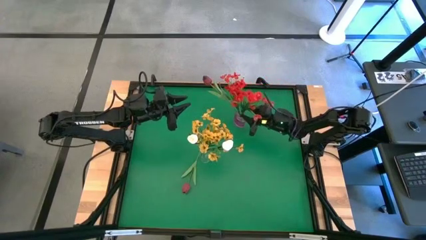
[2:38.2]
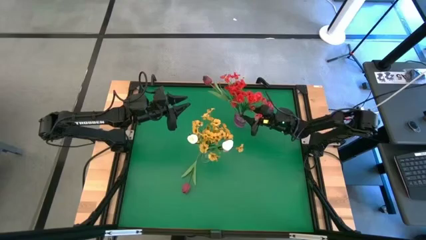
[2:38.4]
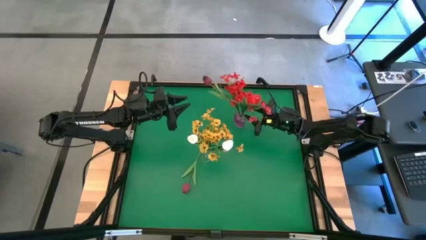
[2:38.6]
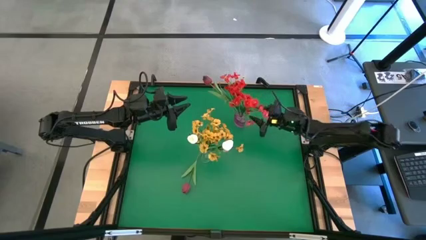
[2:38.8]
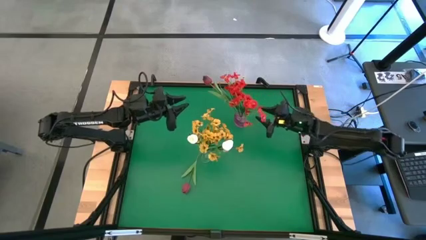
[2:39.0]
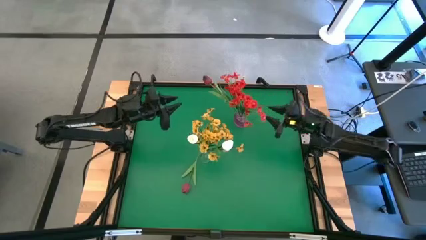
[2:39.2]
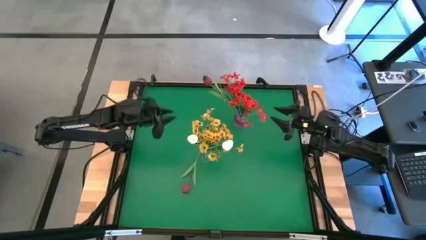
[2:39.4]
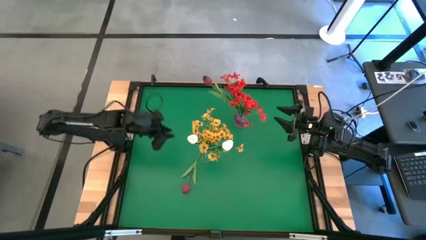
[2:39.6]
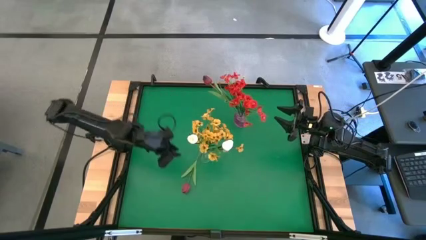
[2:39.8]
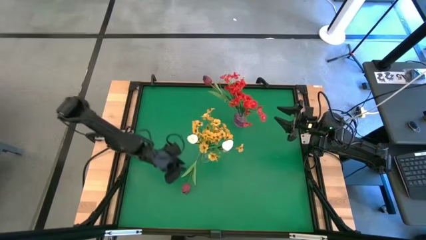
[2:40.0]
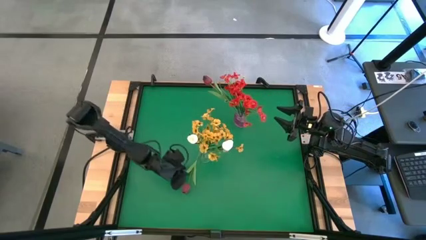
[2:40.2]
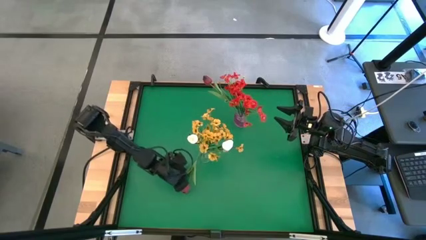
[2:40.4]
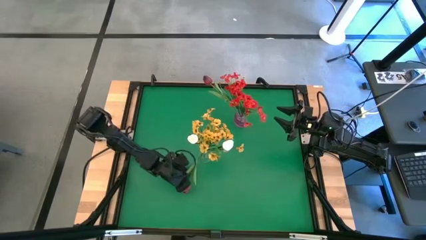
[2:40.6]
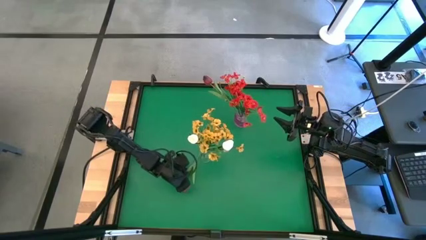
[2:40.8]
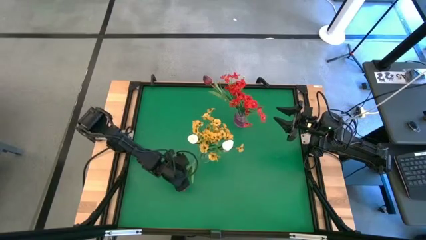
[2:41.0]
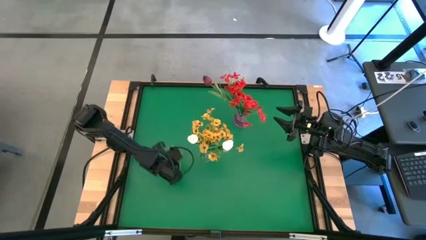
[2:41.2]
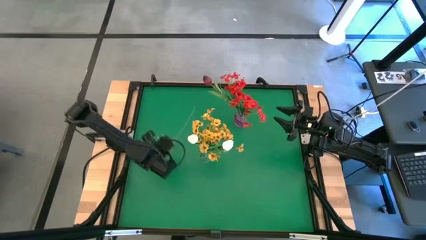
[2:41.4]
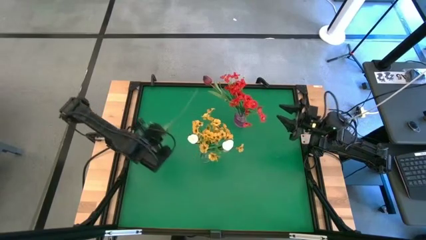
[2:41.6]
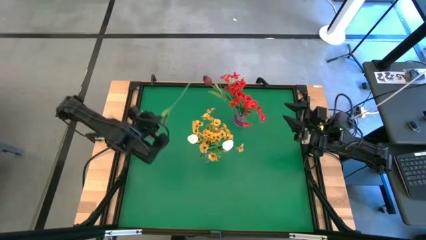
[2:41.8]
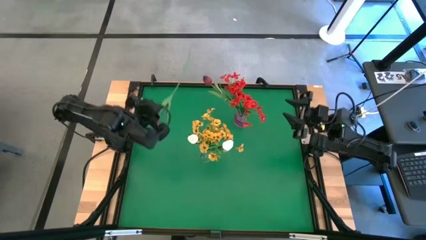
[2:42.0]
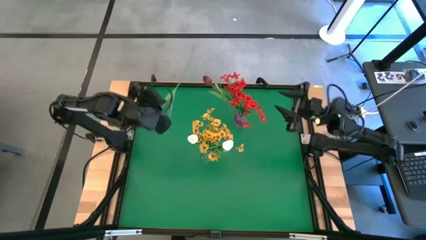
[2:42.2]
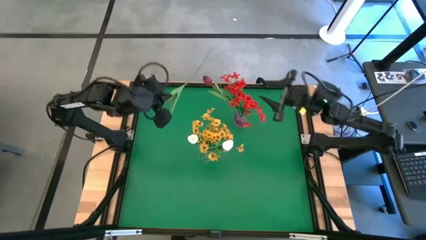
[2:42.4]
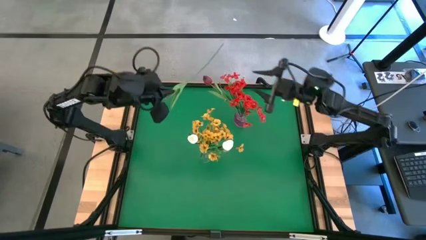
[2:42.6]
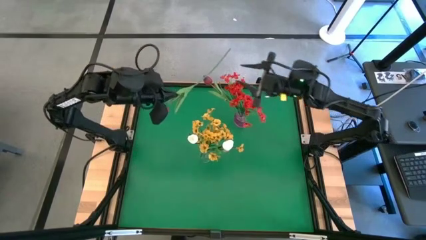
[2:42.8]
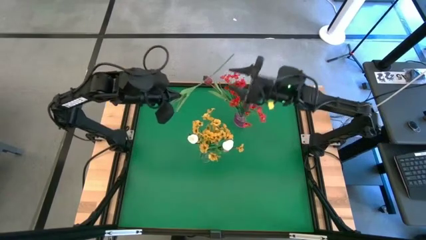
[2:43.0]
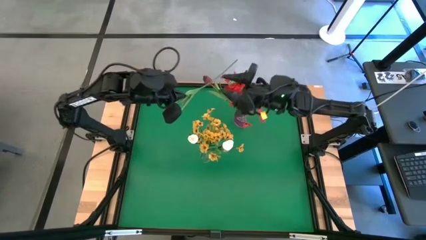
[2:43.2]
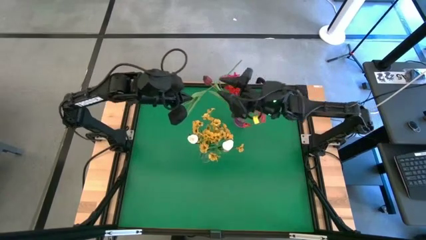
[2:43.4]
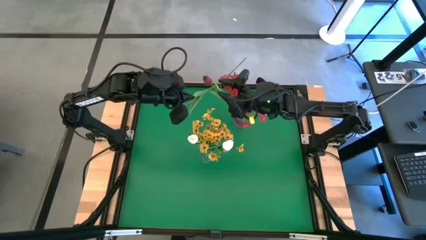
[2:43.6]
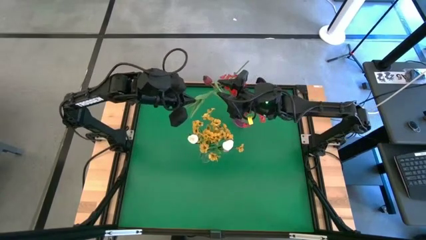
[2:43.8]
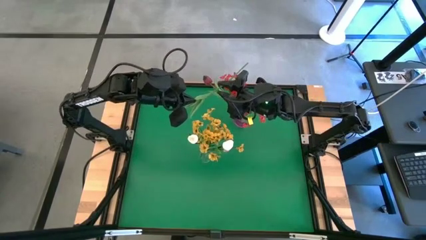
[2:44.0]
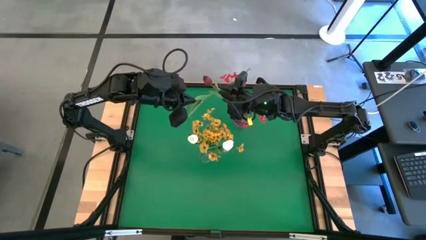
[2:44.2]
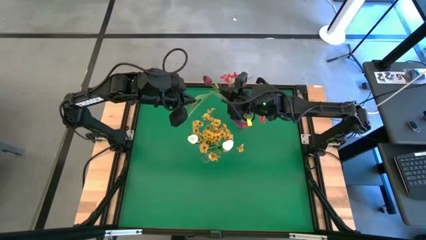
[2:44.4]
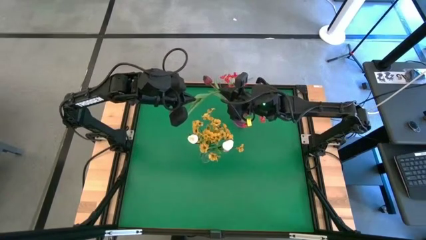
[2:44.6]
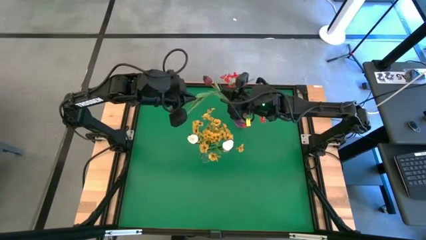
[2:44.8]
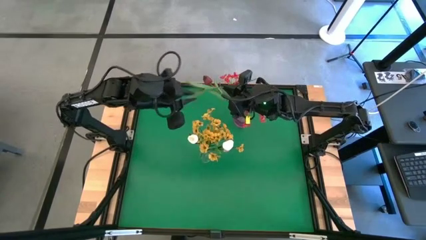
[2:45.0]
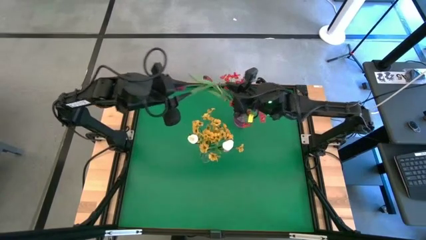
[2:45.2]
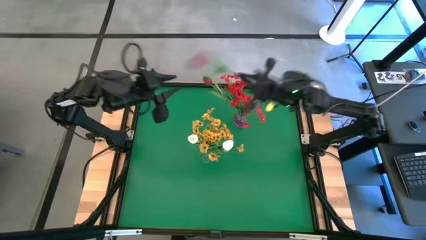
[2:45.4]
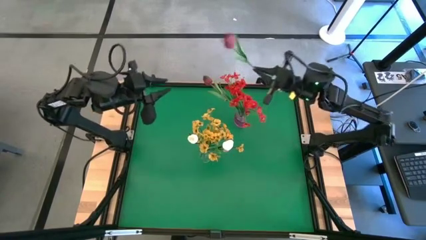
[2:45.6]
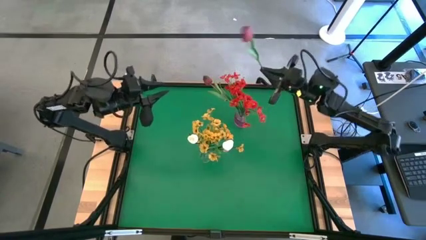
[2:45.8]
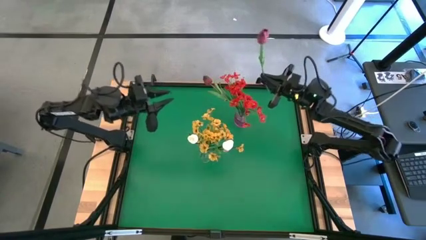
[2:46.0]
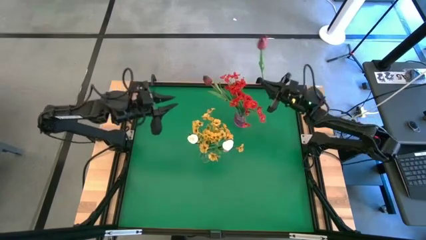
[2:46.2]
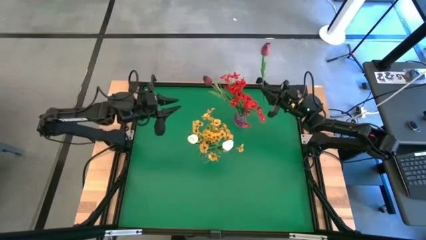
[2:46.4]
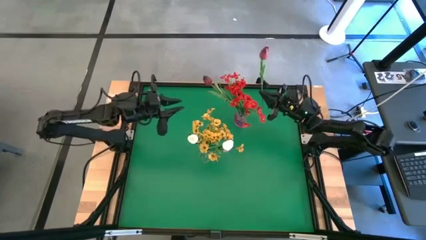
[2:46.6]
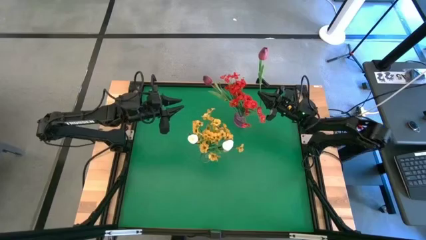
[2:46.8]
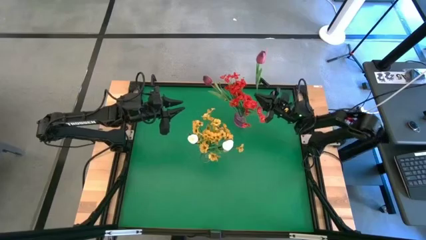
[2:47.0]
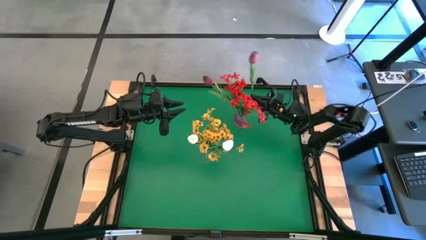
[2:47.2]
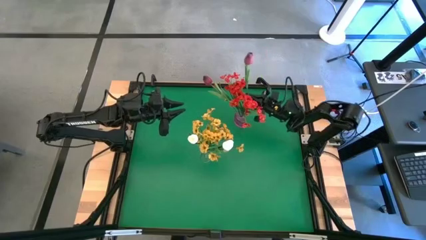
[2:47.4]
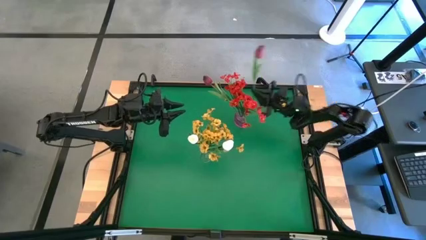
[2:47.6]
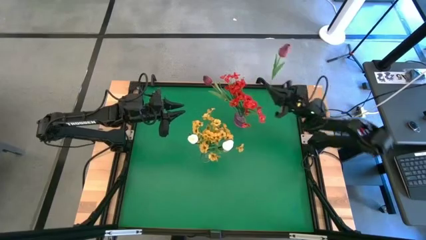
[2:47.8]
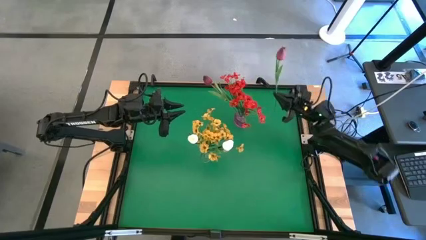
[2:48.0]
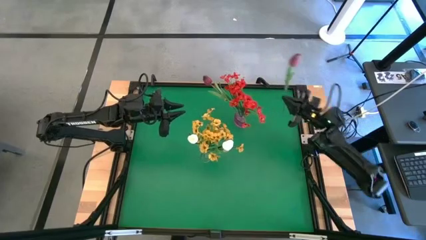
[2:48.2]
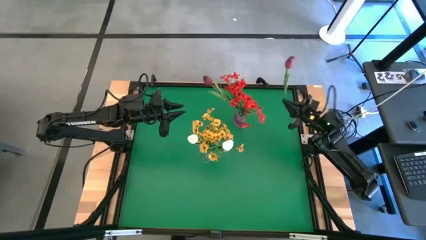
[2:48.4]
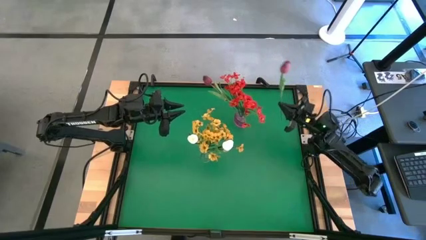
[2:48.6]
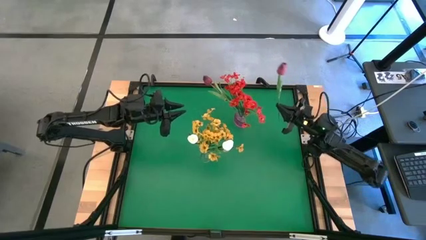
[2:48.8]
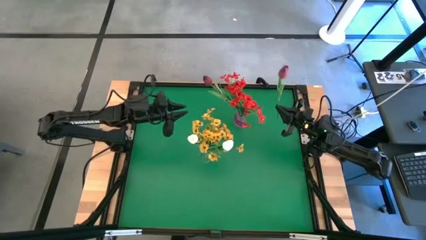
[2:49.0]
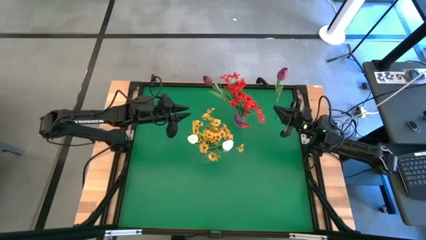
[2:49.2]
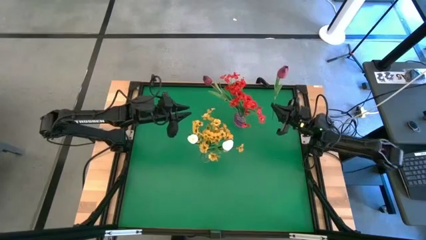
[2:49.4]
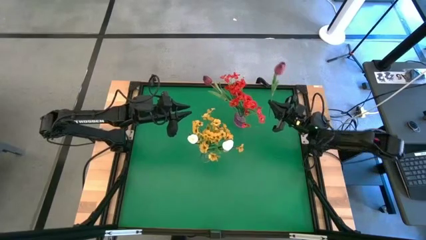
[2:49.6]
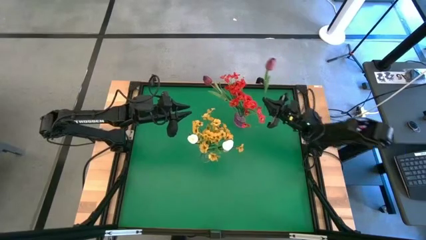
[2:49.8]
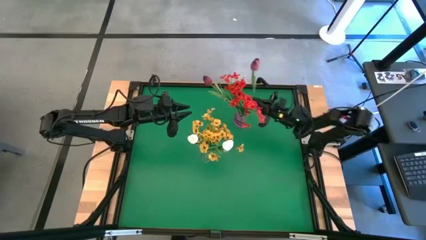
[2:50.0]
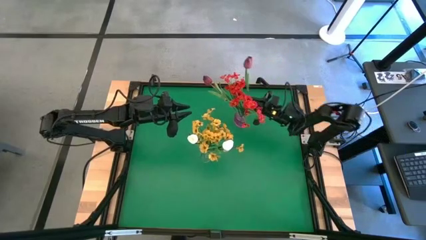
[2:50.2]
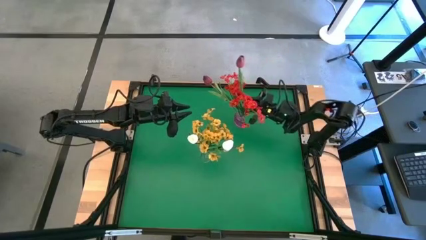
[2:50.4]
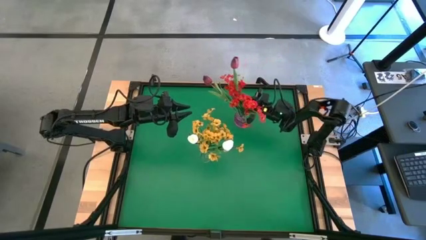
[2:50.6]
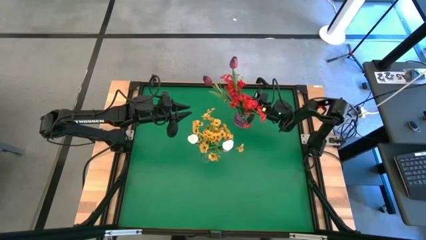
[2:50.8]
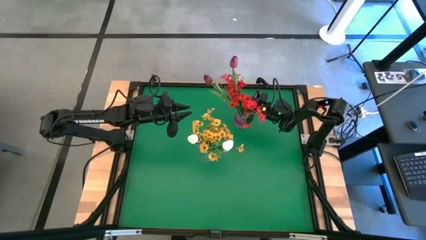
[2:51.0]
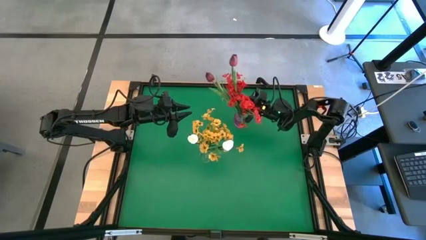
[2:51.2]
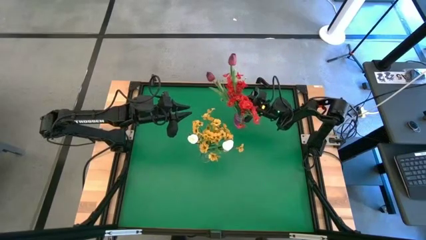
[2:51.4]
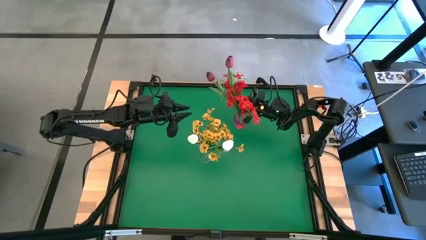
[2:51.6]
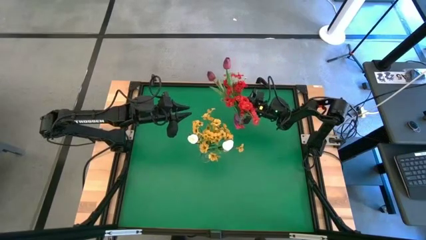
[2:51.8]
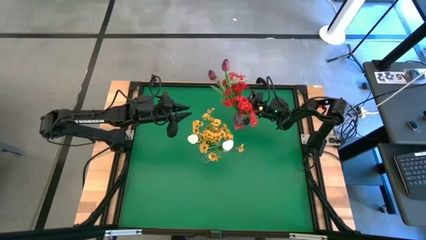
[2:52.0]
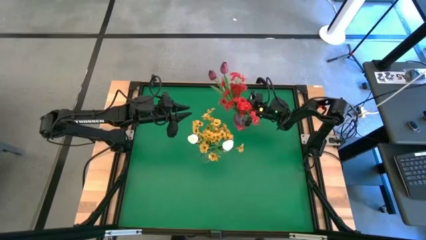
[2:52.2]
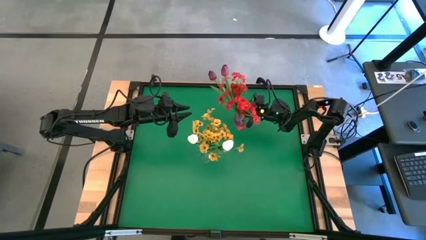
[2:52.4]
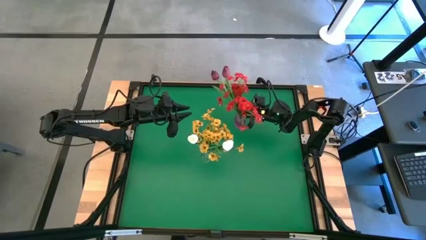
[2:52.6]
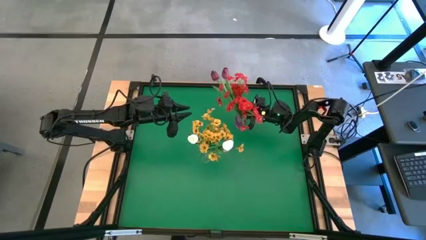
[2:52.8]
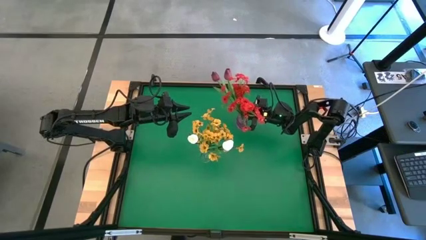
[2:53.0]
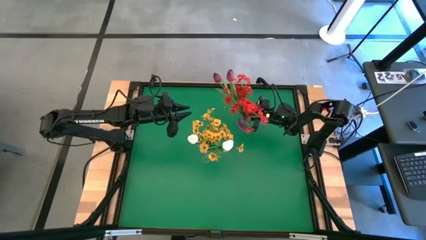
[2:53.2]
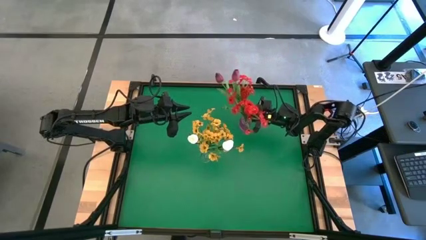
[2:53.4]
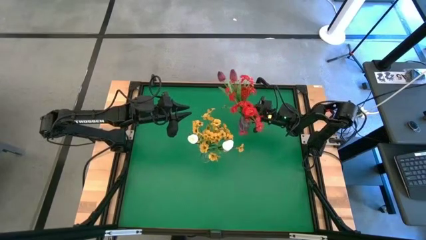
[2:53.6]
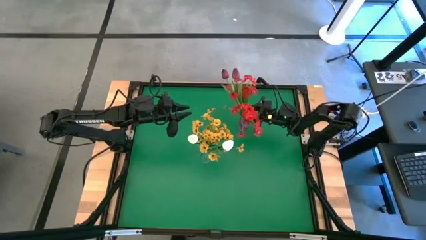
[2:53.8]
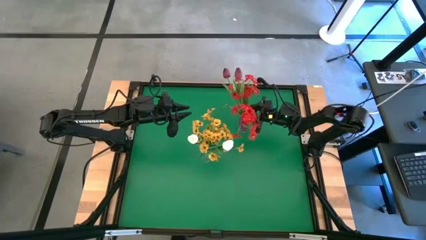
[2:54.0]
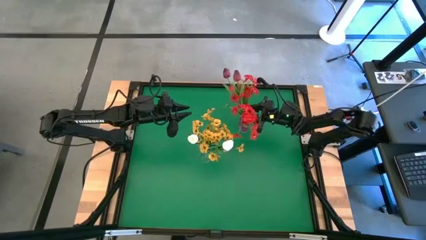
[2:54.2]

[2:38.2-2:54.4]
Task: Sort flowers into vase by color
Put the red tulip into the violet vase
